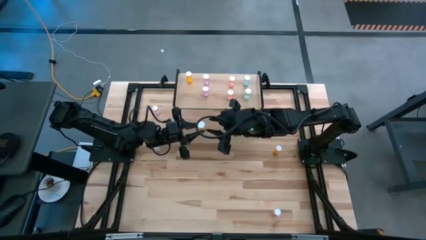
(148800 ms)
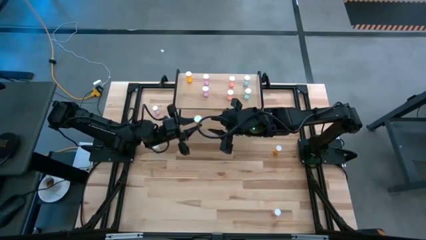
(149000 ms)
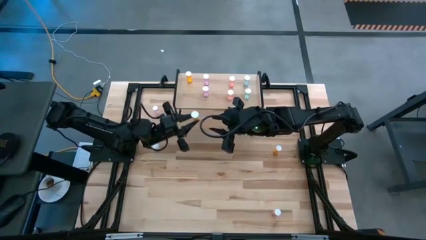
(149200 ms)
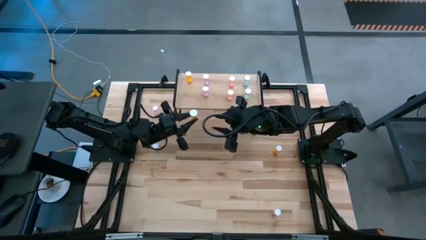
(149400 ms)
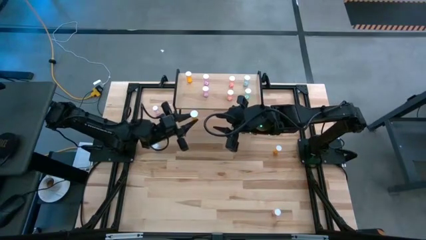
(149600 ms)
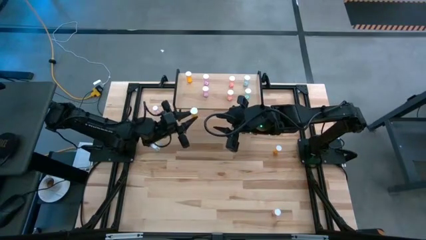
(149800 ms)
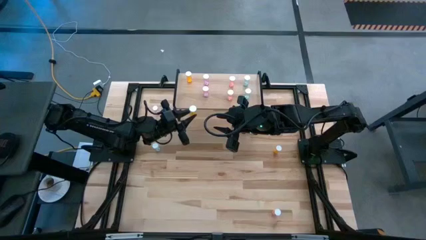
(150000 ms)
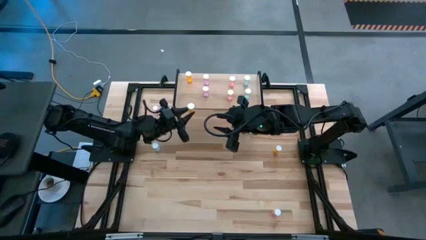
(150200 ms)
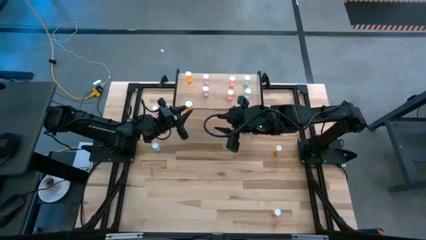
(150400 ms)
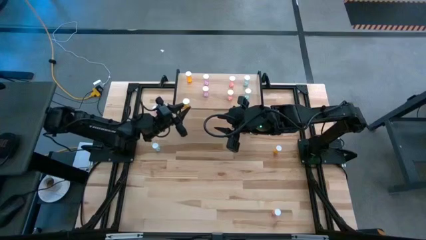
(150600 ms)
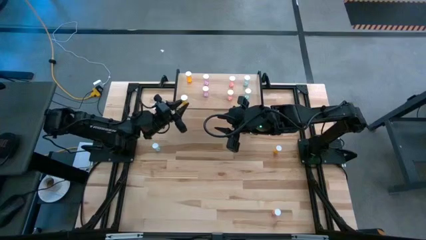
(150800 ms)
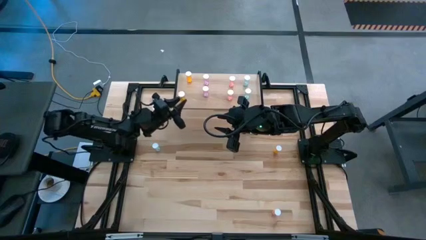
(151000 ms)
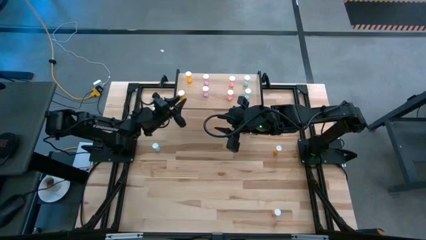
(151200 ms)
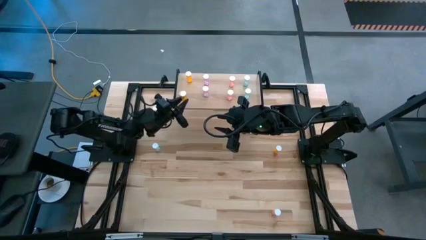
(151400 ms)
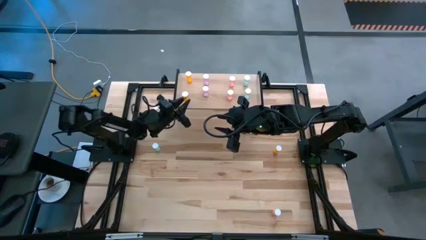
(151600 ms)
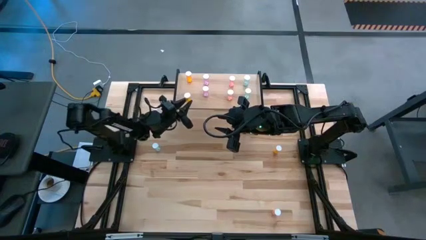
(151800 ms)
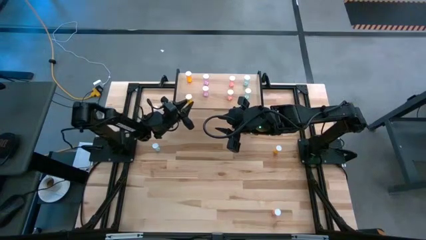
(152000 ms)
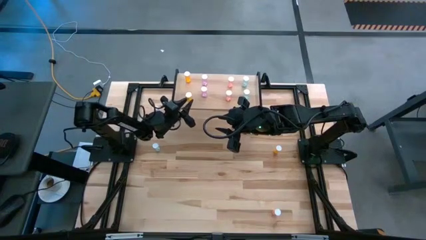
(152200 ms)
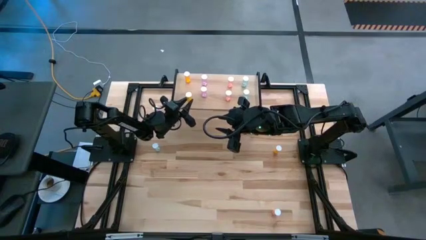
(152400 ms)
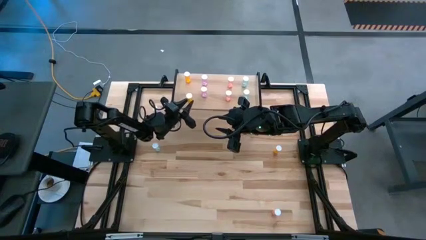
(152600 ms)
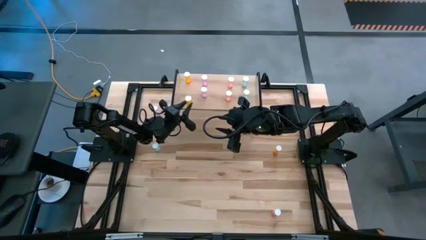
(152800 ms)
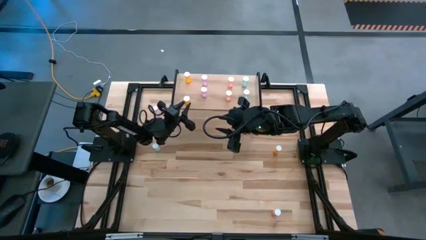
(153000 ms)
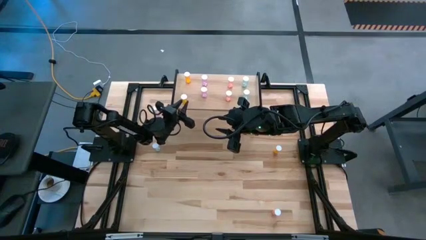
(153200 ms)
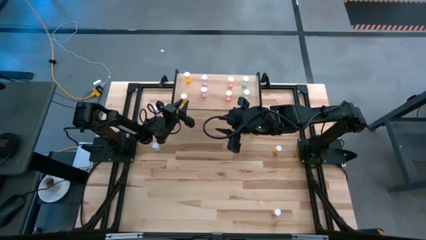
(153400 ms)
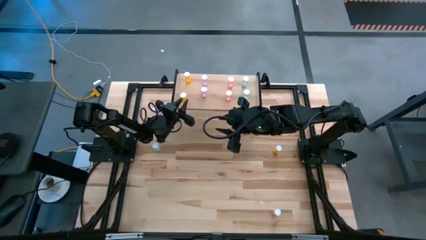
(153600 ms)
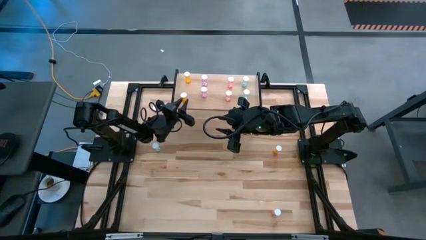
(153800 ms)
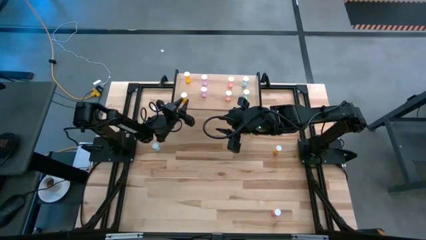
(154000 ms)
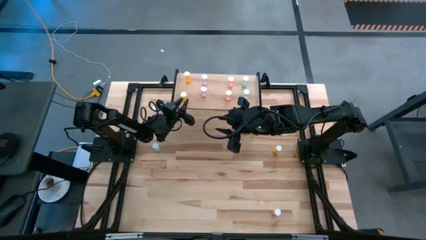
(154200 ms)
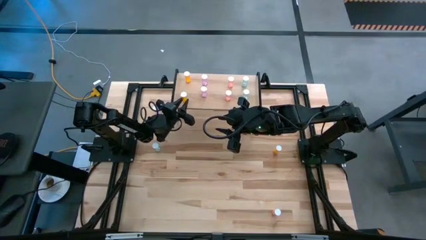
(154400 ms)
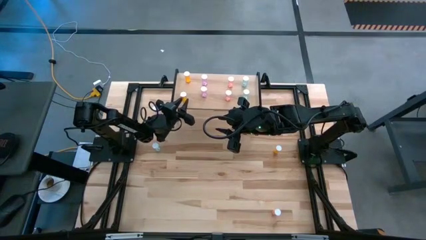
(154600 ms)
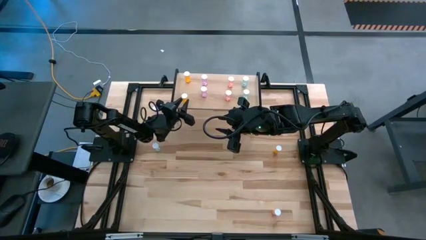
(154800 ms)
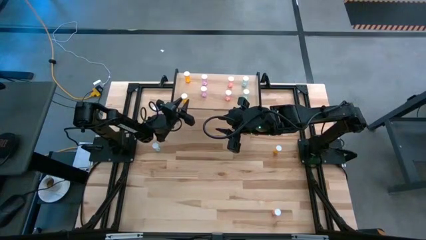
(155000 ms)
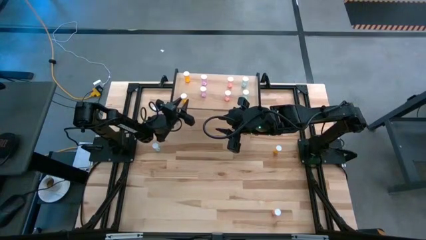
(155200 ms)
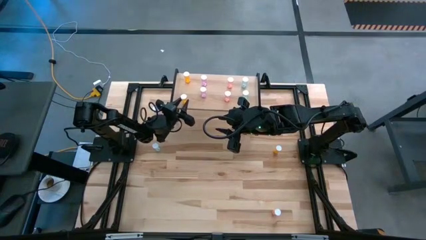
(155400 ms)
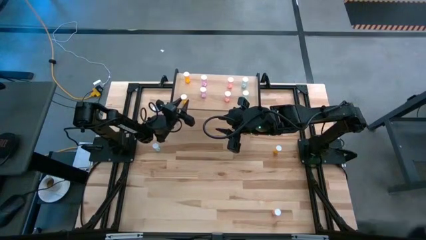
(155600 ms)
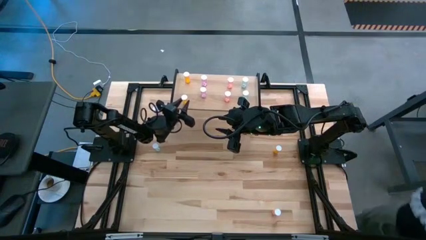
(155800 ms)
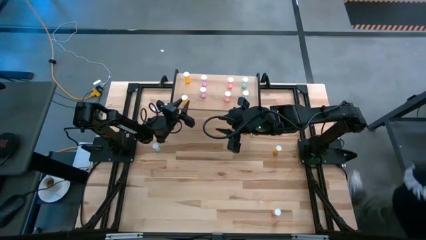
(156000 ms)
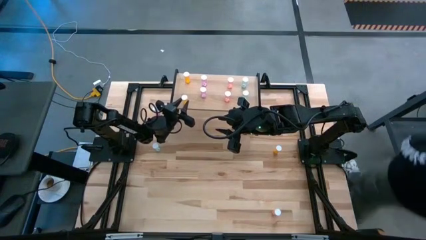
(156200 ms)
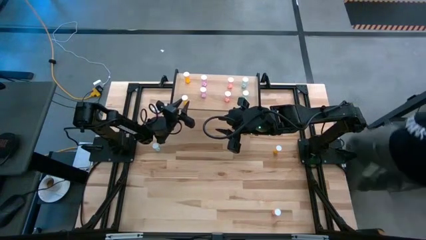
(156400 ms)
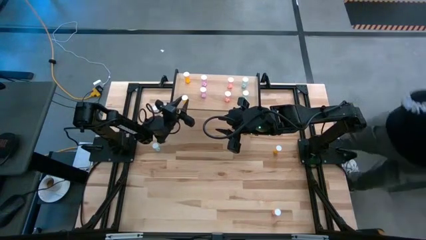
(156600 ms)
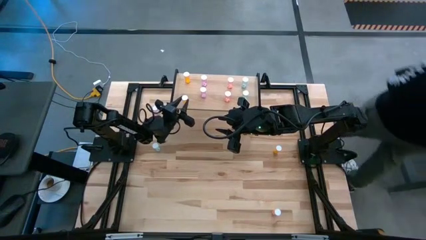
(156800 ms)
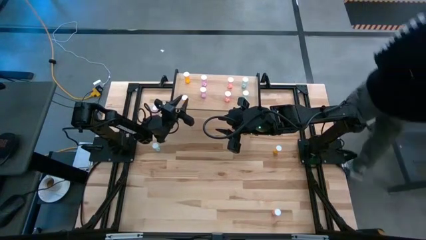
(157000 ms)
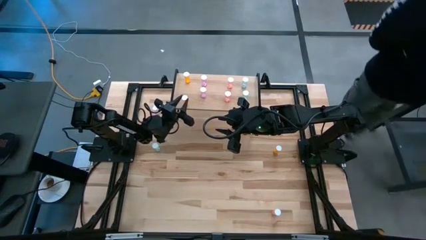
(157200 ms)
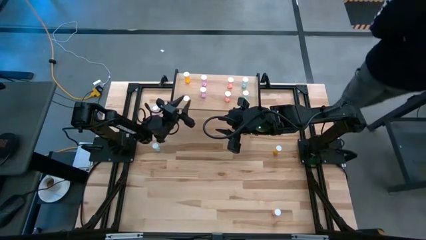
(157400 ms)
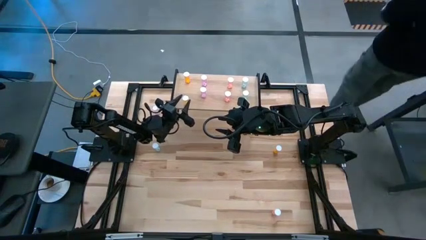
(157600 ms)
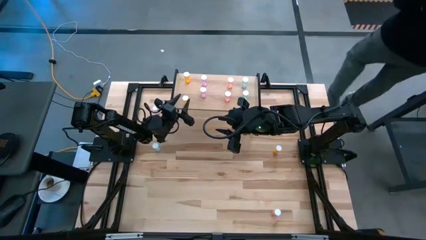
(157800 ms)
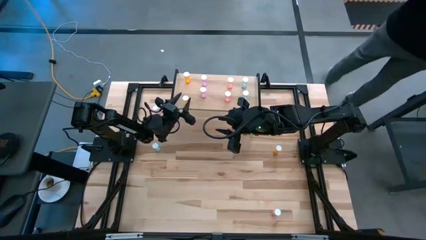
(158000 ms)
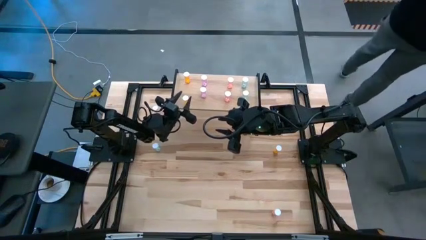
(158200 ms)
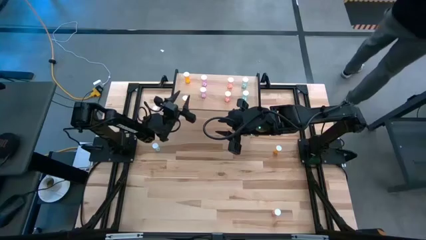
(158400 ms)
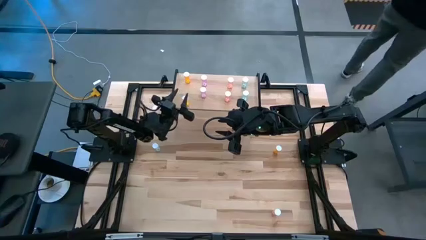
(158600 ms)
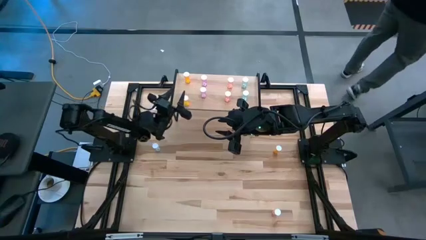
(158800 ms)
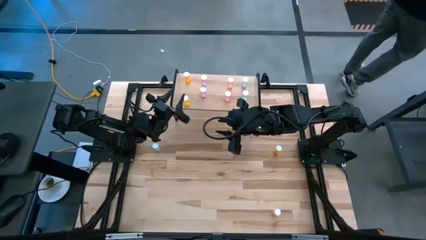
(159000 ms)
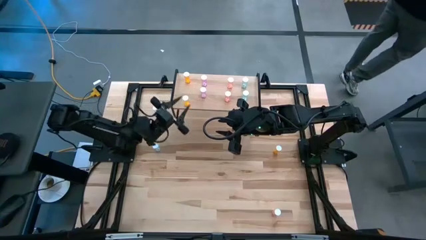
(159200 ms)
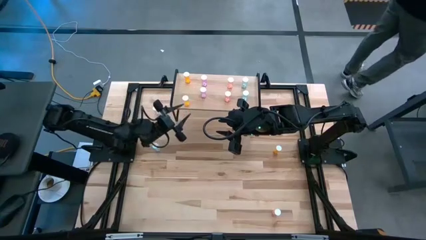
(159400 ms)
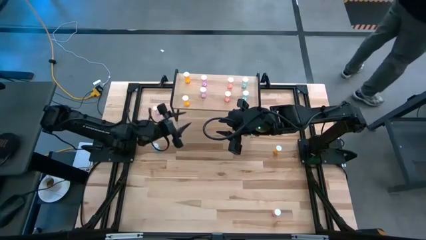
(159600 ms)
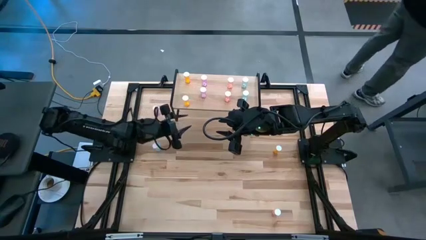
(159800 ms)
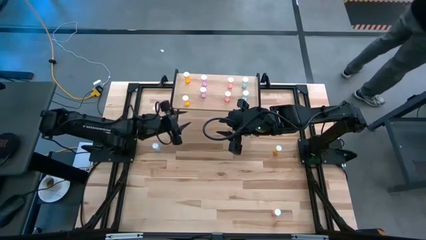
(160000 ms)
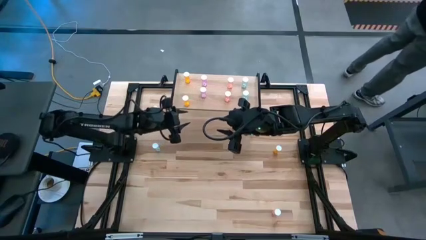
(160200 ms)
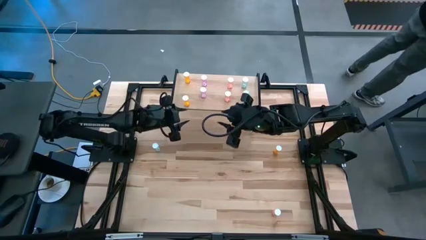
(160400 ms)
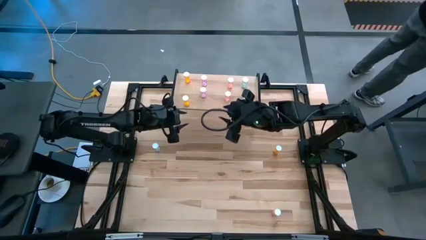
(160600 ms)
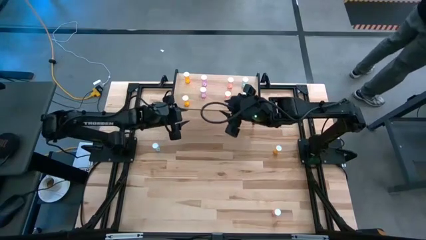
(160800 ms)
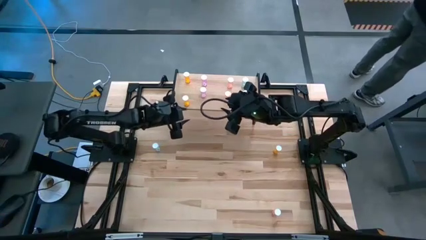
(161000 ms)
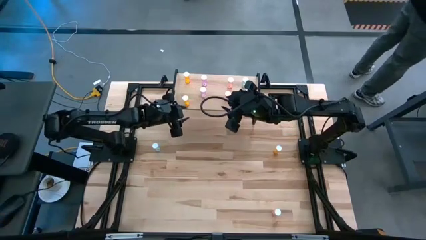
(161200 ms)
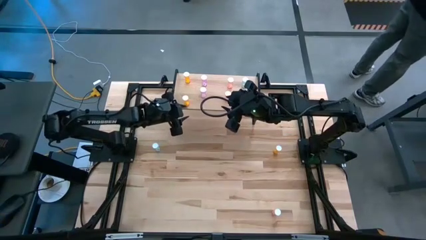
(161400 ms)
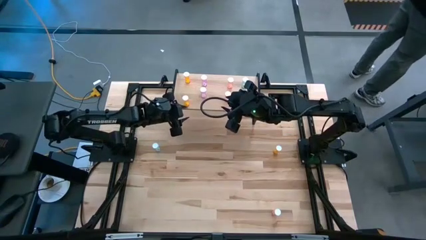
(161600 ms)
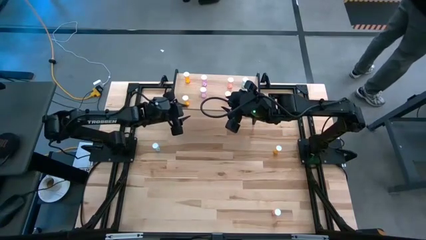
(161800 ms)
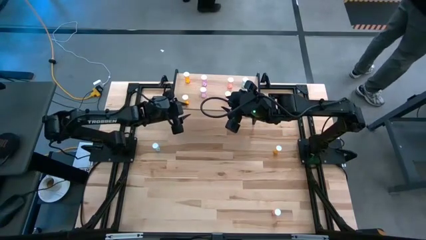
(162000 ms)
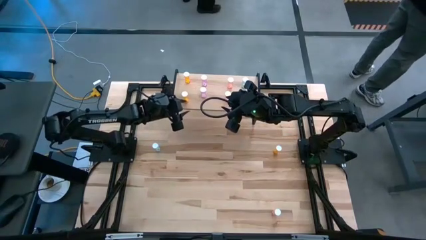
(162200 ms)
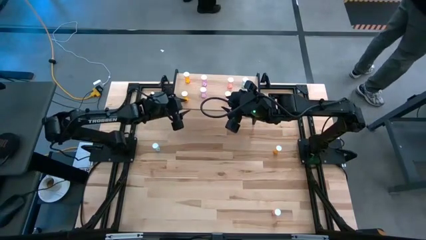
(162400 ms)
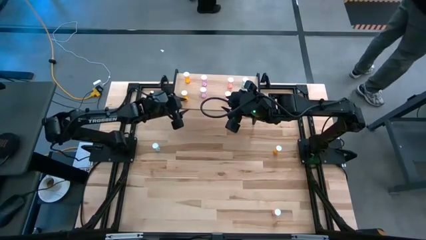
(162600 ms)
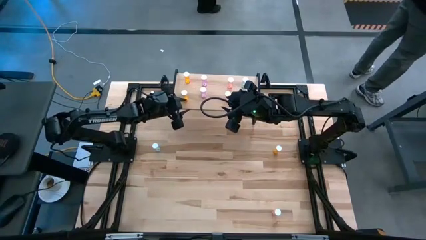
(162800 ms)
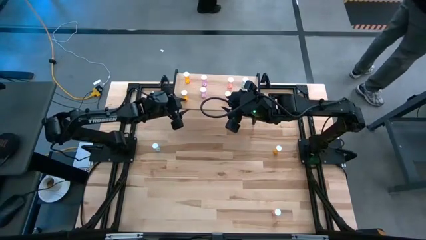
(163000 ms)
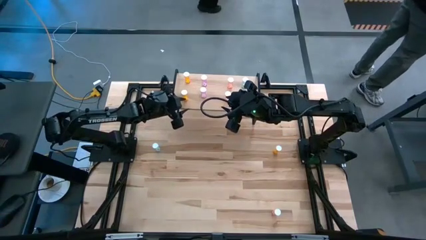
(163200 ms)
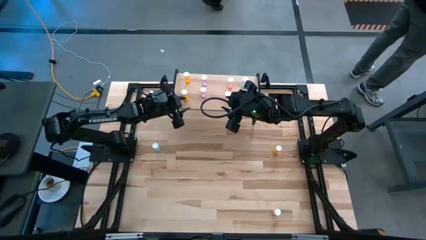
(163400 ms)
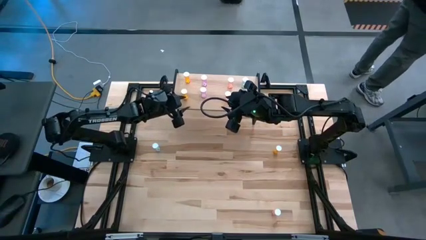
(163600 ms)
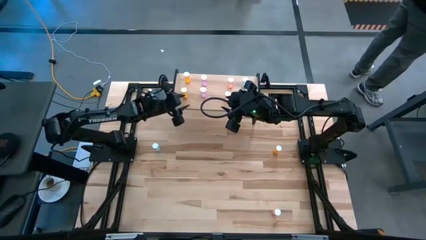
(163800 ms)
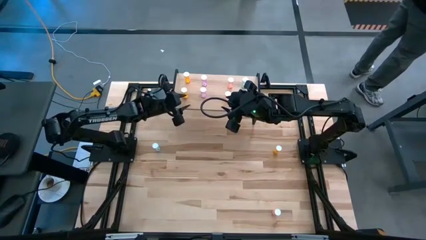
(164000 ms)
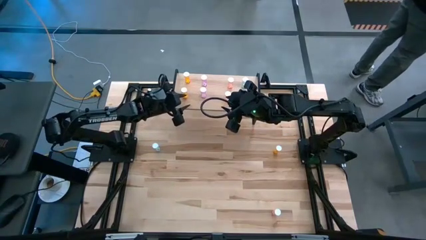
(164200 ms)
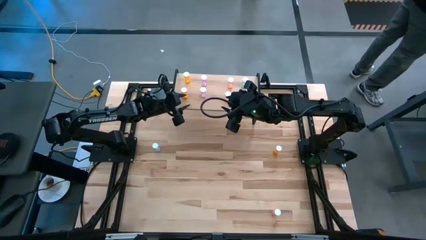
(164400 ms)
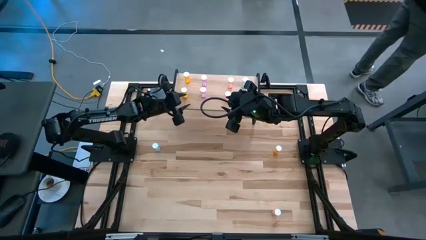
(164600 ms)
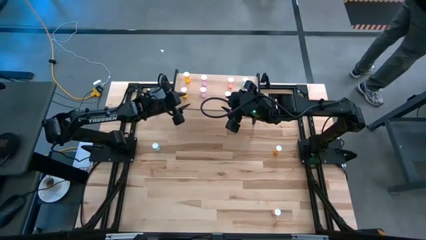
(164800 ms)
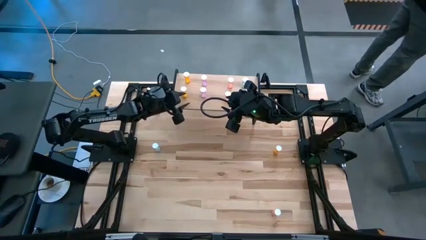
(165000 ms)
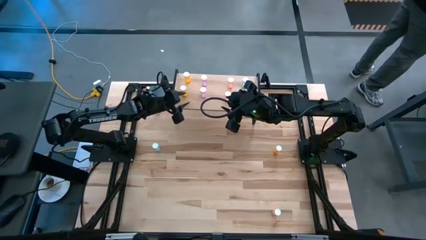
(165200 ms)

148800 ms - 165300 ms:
Task: Pick and place medicine bottles onto shelf by color
Put the bottom orange pill bottle on the shelf aligned with the other orange pill bottle
